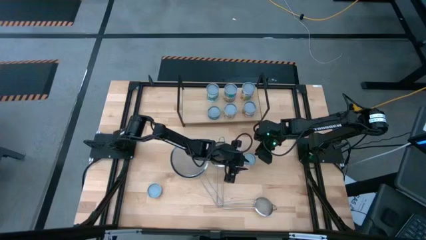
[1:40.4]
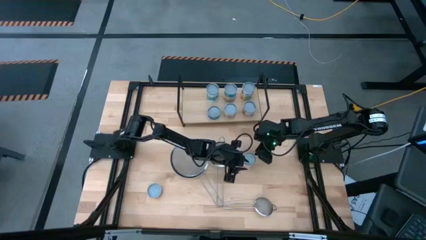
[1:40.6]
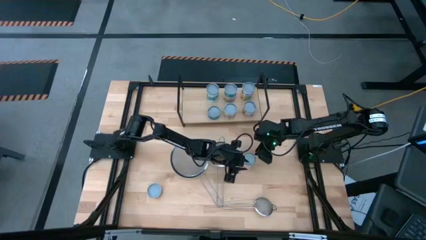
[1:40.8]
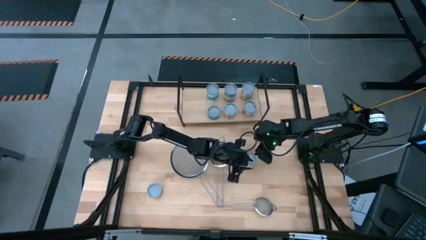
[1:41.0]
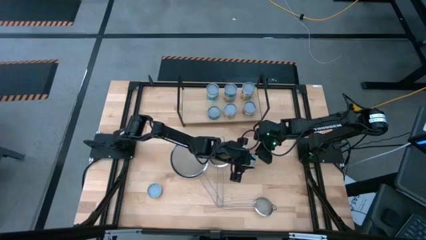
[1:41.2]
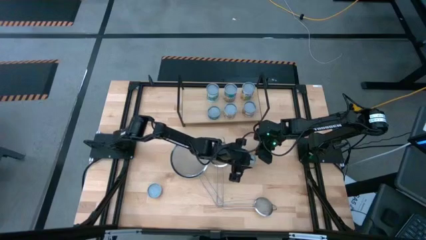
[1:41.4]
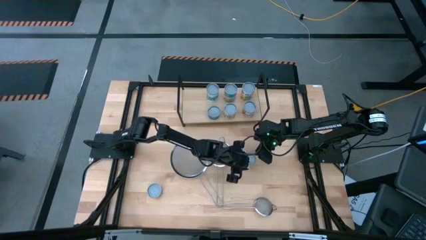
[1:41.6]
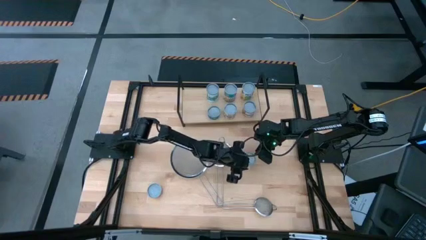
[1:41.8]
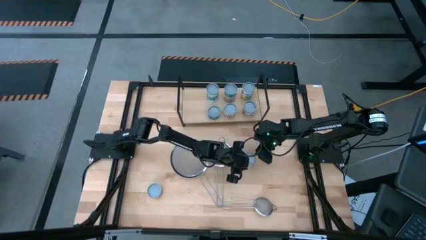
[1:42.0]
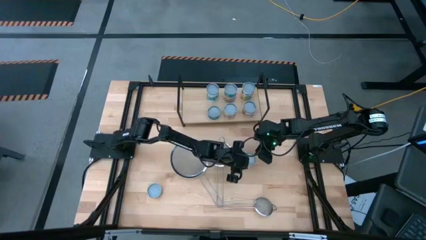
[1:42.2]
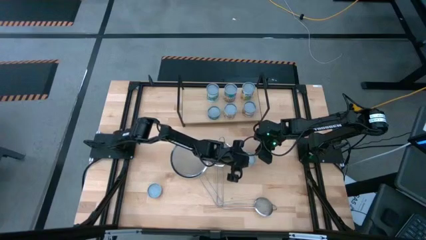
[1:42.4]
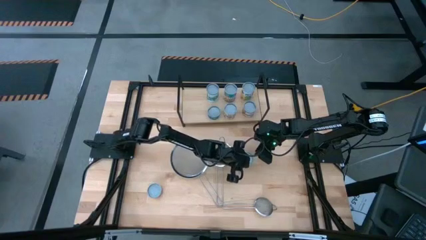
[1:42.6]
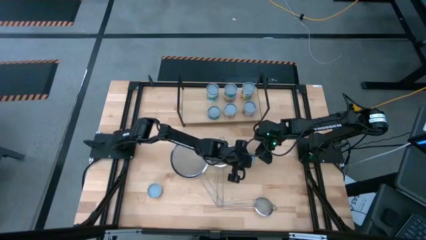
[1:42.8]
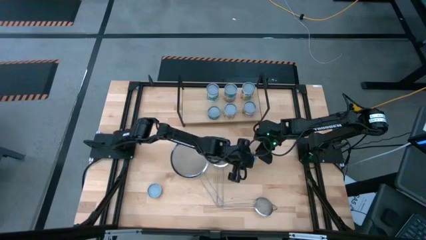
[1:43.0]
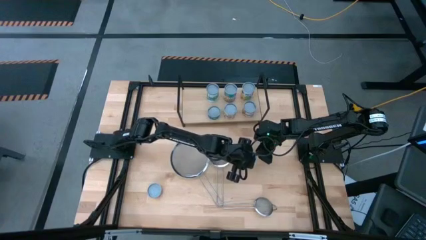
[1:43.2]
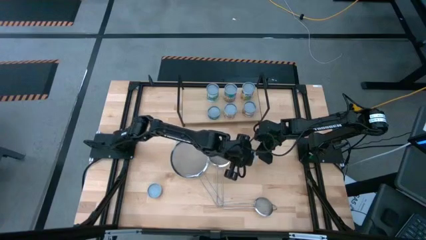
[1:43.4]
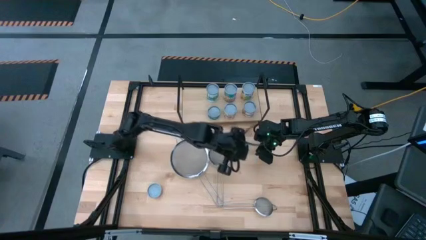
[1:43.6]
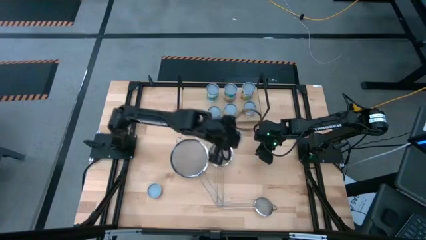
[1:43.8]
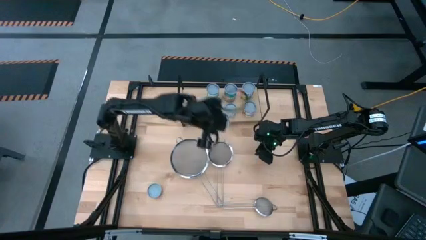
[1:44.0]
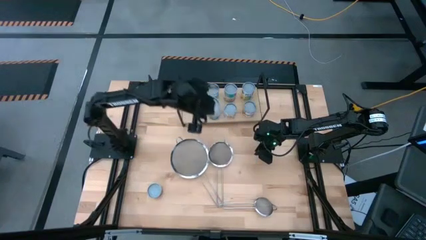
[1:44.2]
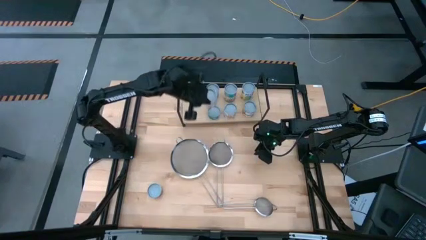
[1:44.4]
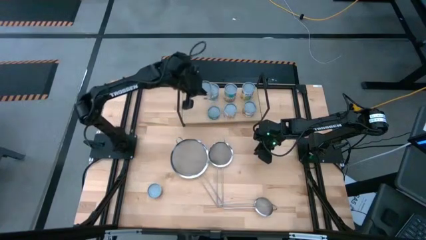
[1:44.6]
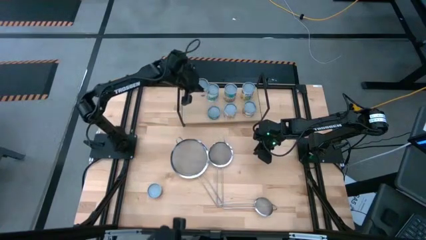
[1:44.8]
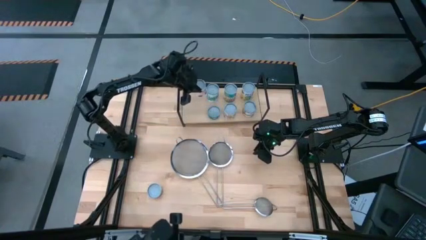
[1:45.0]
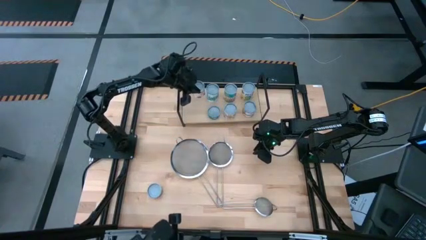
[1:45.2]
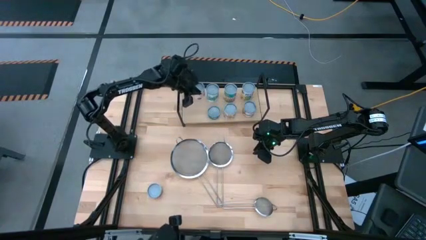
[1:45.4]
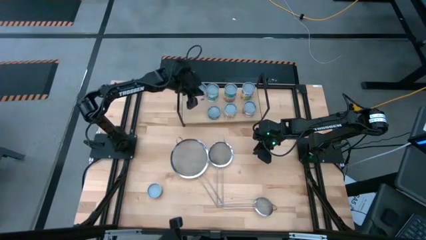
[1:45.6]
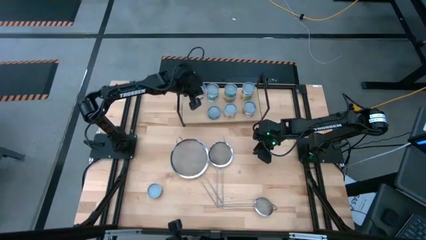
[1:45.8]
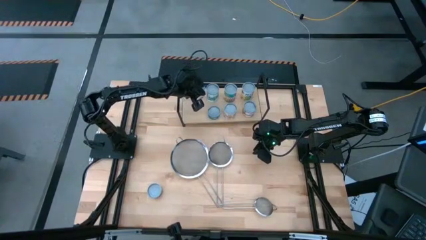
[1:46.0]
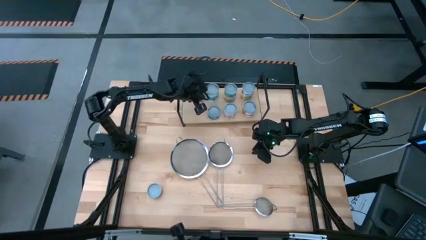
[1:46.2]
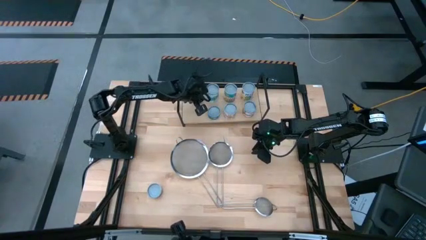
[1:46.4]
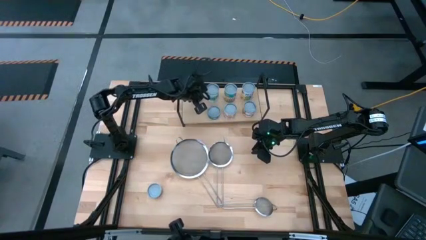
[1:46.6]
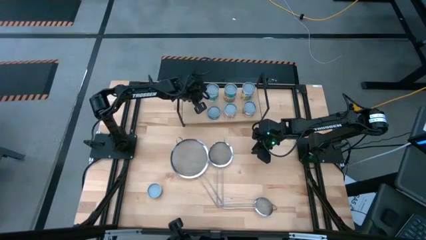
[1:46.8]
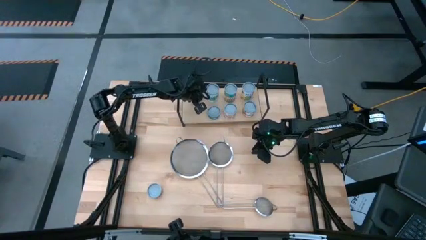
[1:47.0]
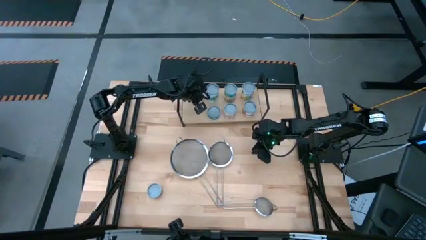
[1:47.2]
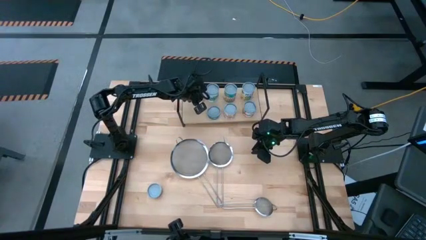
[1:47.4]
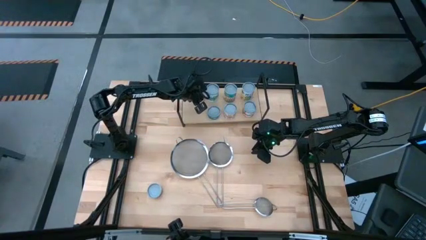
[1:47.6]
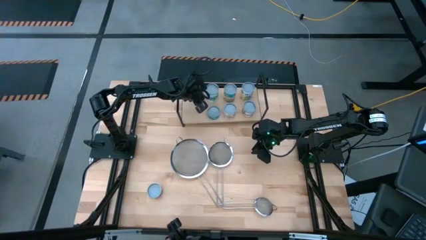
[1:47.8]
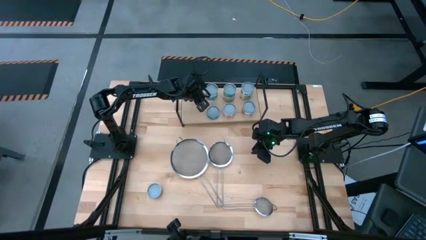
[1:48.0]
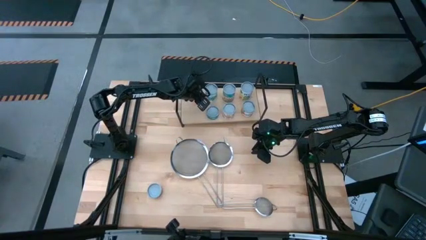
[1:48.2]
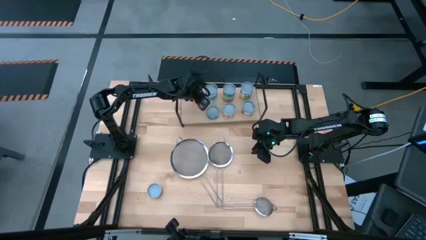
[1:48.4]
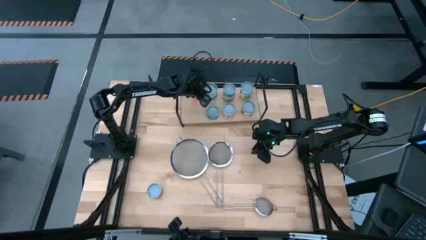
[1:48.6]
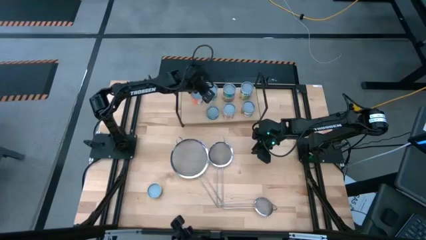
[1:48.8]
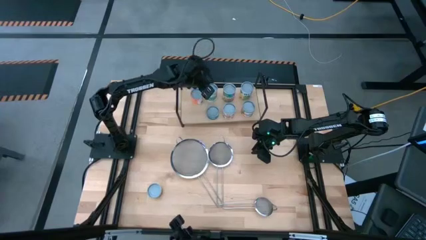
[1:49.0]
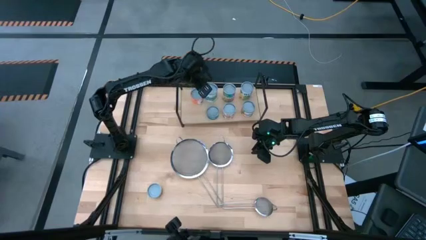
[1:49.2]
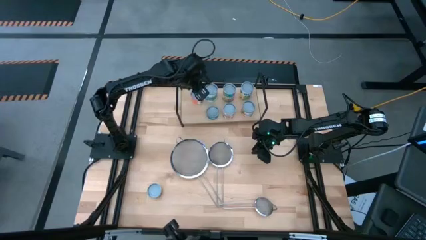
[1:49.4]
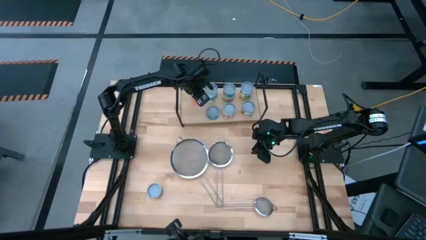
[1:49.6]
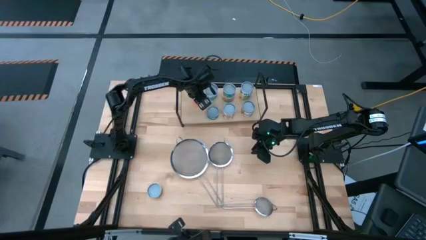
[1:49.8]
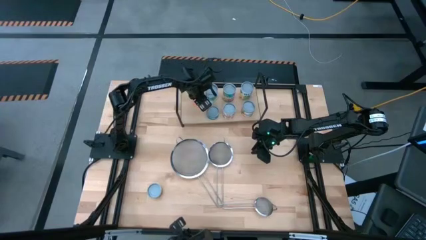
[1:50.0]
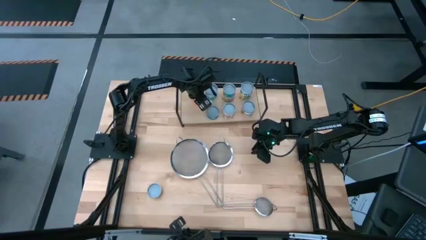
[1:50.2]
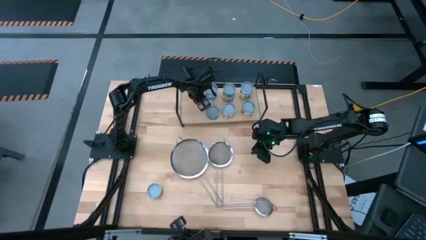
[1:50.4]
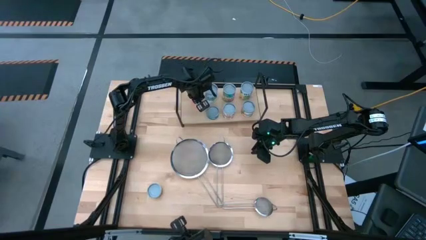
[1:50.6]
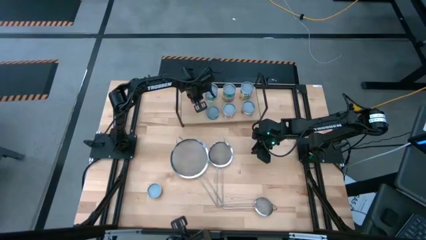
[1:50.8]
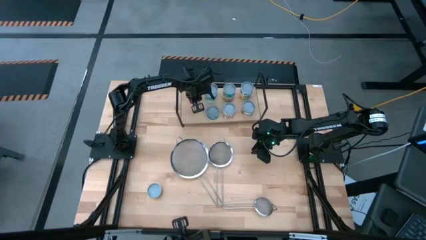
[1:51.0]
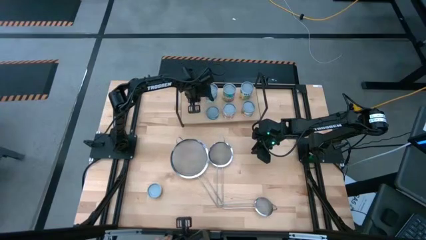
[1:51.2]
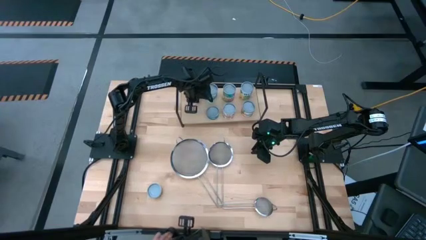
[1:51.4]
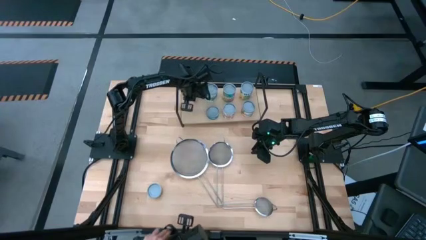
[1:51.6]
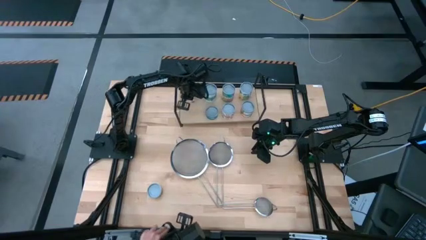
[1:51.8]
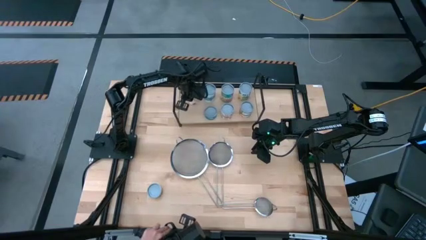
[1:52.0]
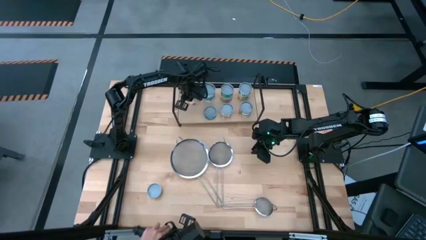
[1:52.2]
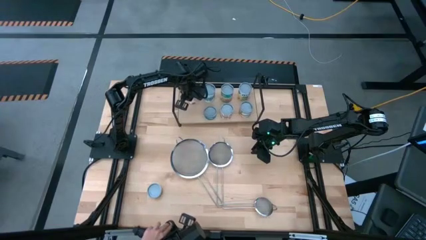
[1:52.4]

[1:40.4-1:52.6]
Task: Pick and place cans onto a shelf
Put the canned meatballs on the shelf

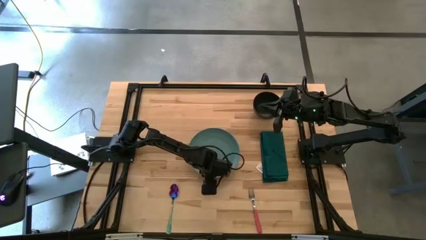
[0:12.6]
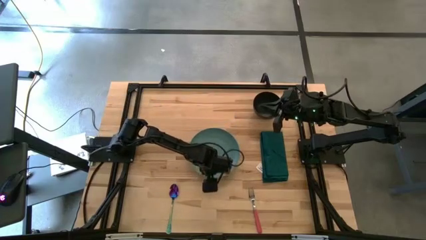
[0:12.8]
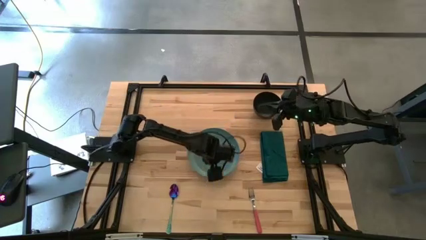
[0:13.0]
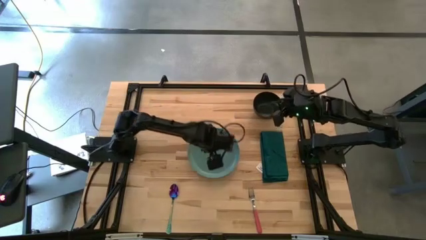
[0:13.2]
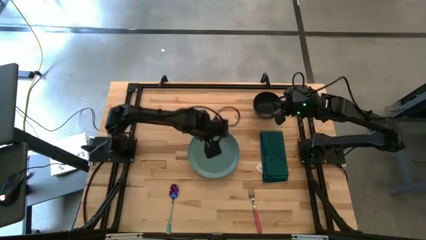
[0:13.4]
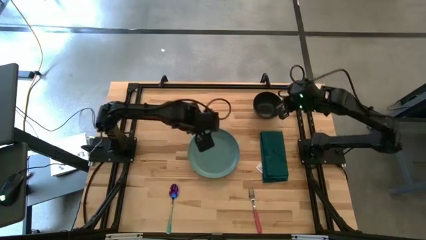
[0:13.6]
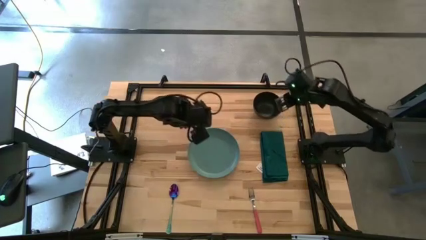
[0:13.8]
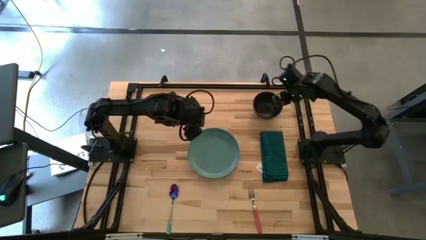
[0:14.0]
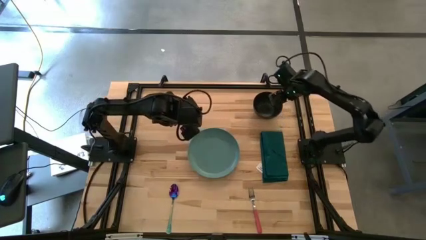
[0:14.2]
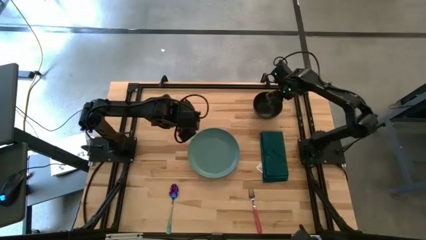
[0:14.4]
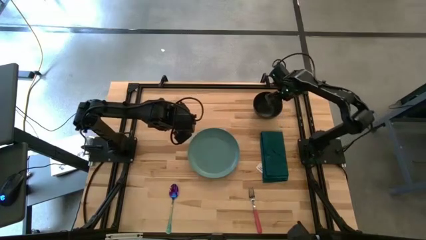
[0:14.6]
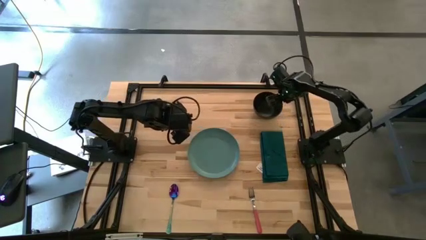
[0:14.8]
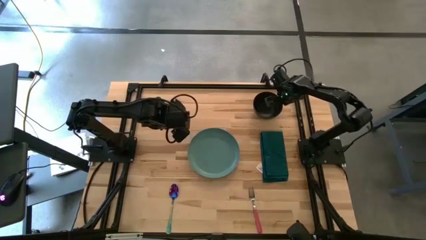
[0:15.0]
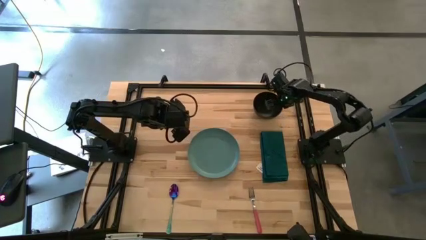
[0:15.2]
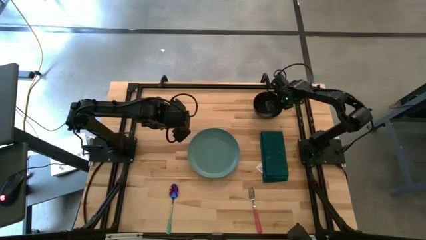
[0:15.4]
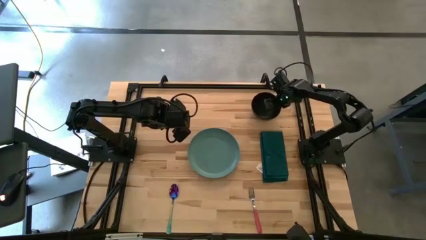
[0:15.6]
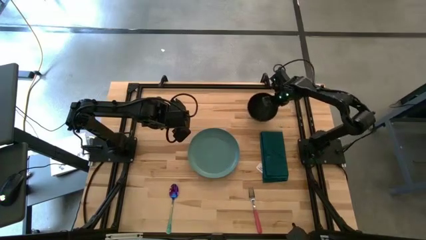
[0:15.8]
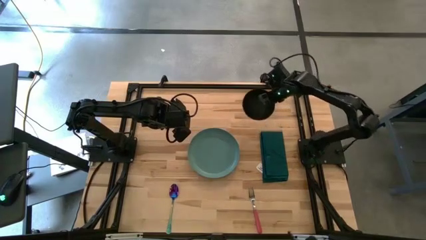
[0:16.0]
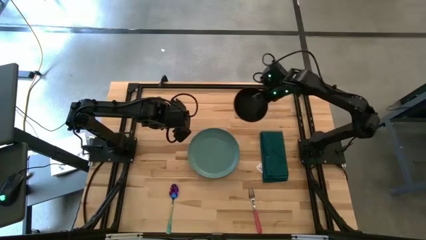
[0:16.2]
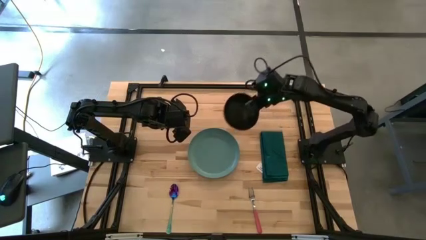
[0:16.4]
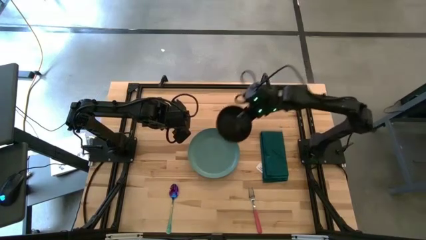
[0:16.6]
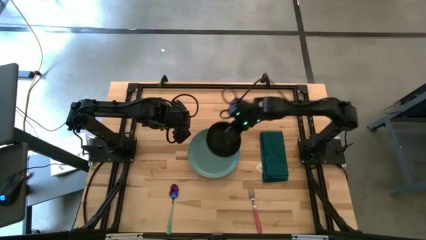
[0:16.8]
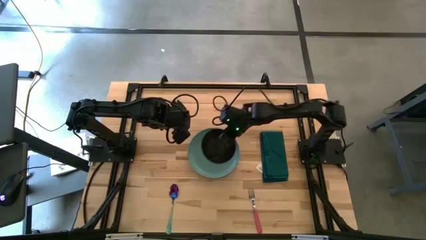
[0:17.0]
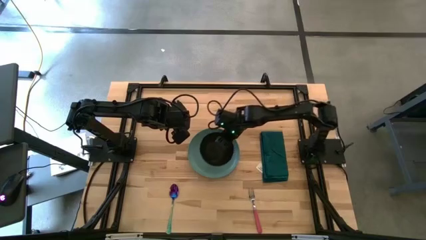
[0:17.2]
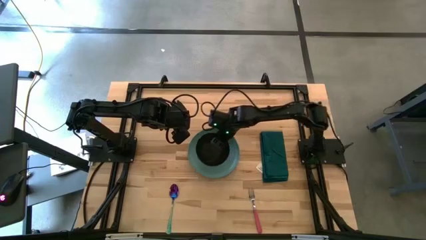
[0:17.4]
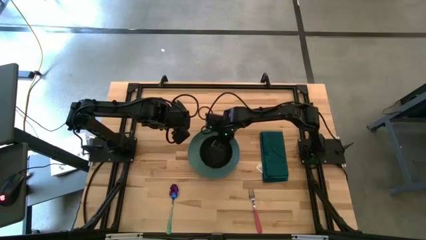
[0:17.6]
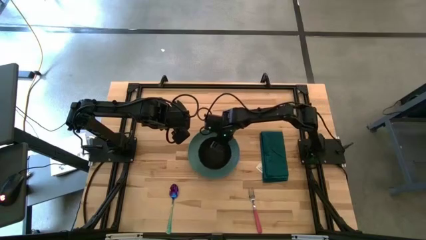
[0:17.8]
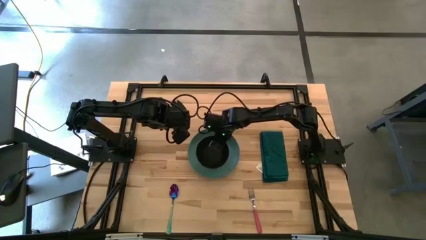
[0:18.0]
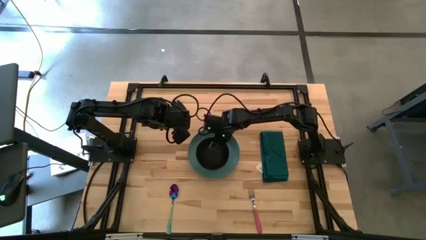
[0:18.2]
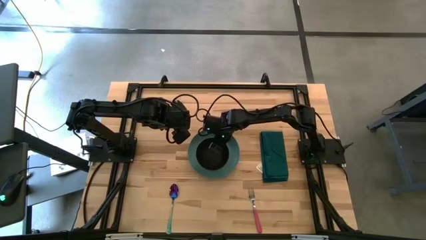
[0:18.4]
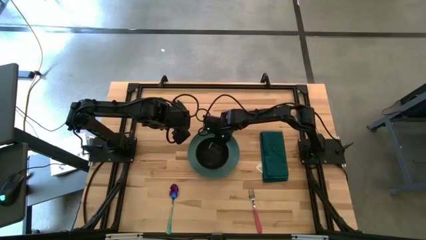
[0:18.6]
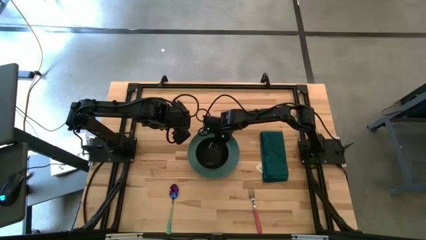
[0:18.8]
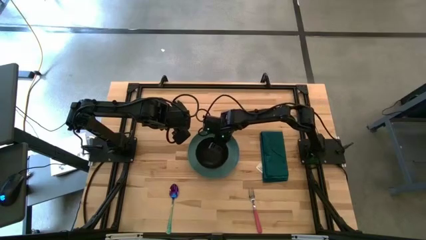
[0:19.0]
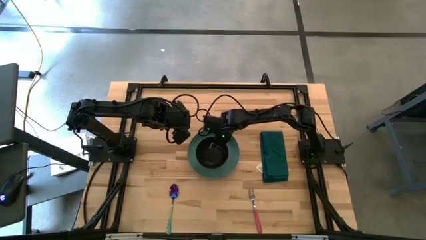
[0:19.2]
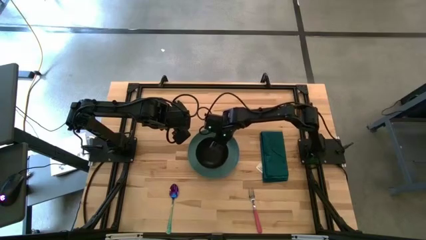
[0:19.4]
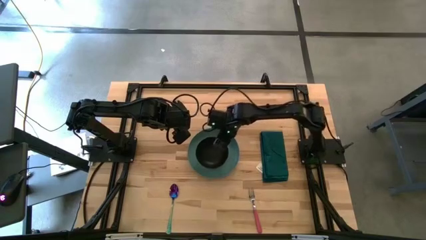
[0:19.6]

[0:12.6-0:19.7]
Task: Set table place
Put the black bowl on top of the green plate on the table
